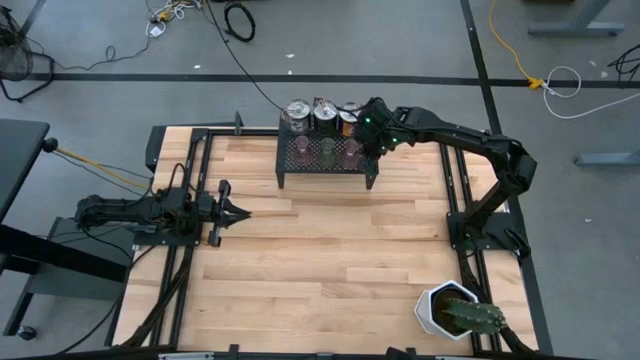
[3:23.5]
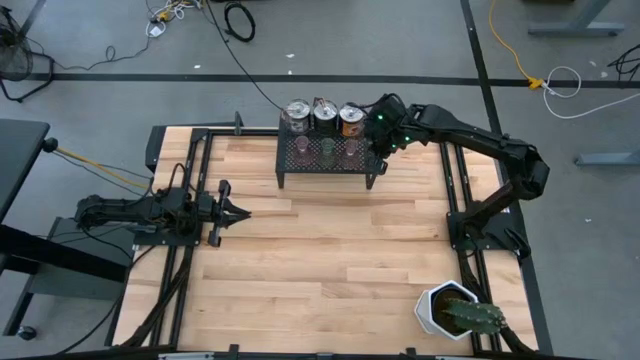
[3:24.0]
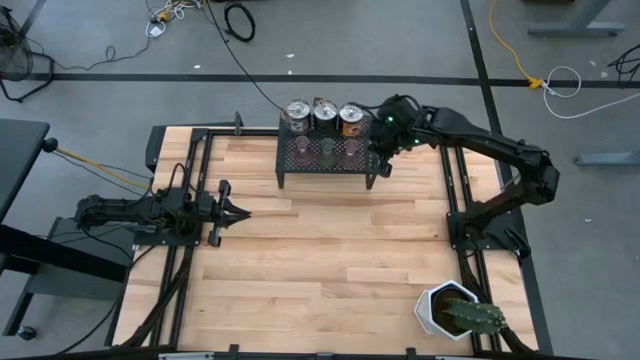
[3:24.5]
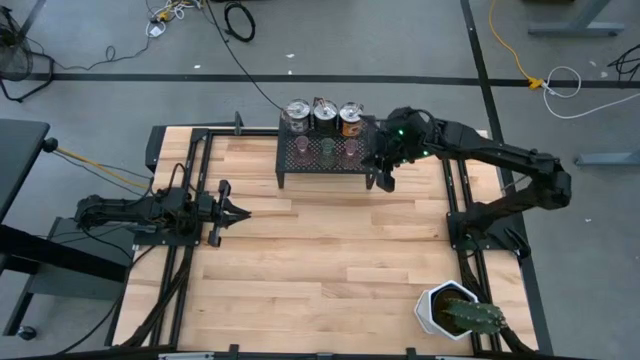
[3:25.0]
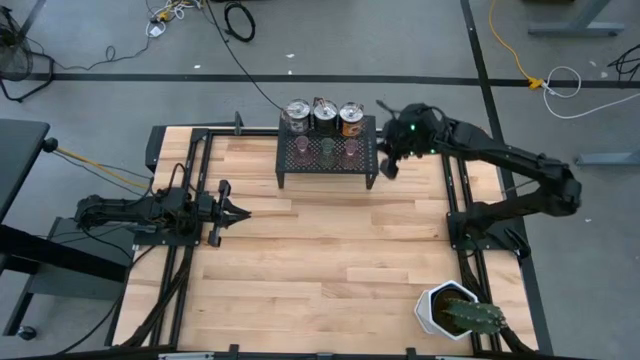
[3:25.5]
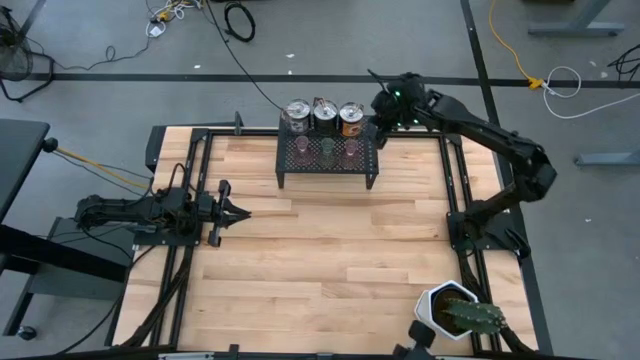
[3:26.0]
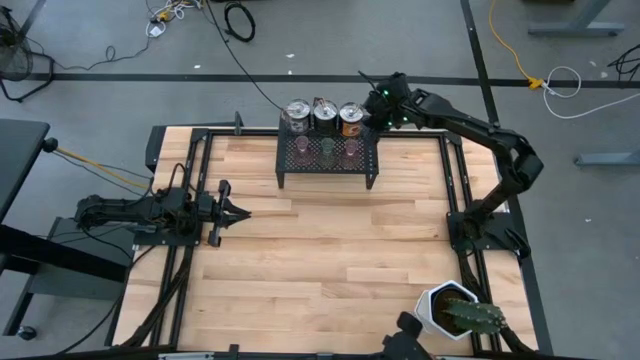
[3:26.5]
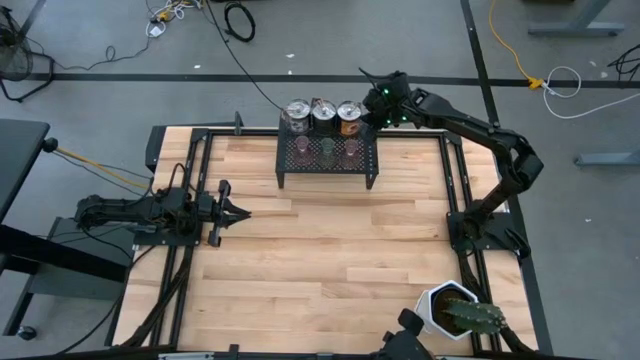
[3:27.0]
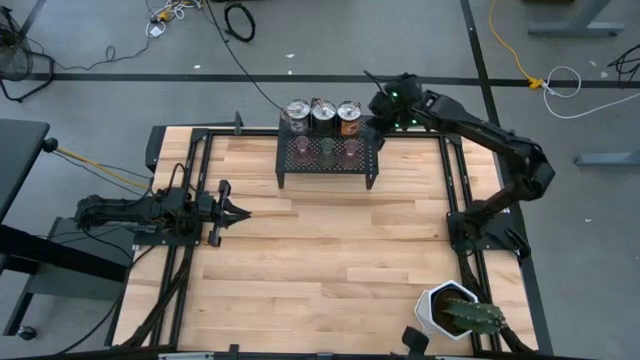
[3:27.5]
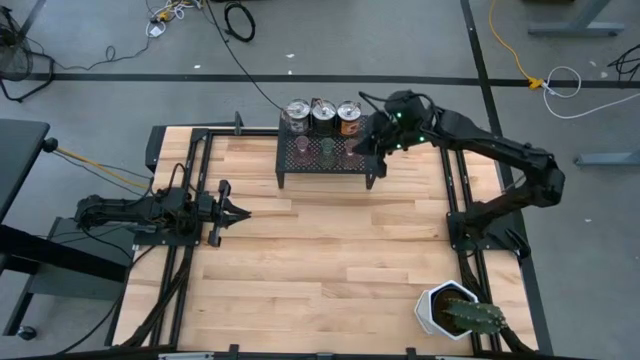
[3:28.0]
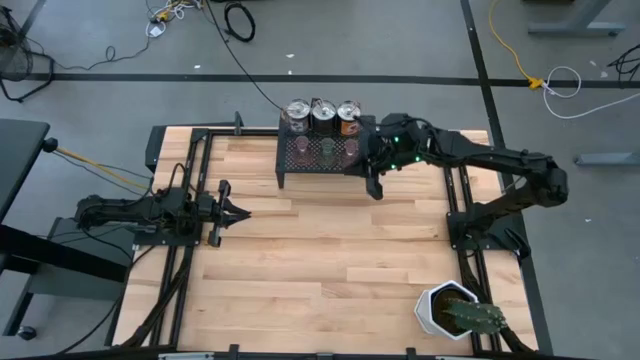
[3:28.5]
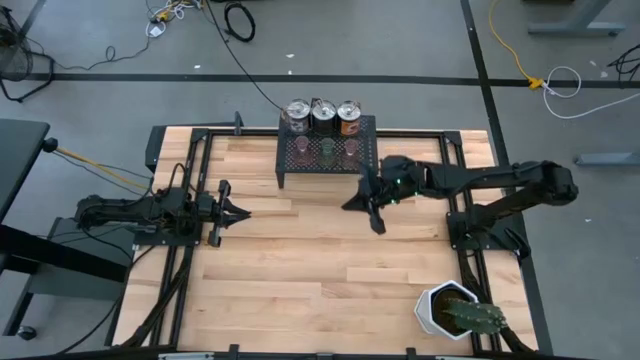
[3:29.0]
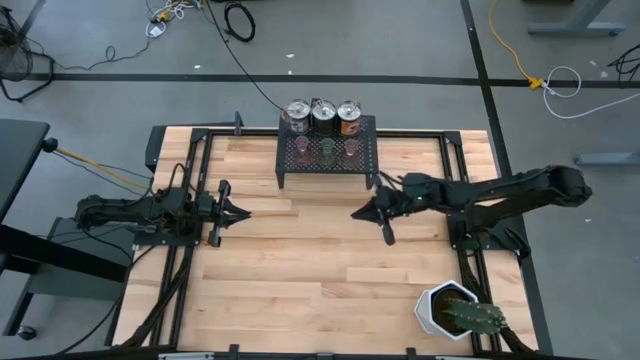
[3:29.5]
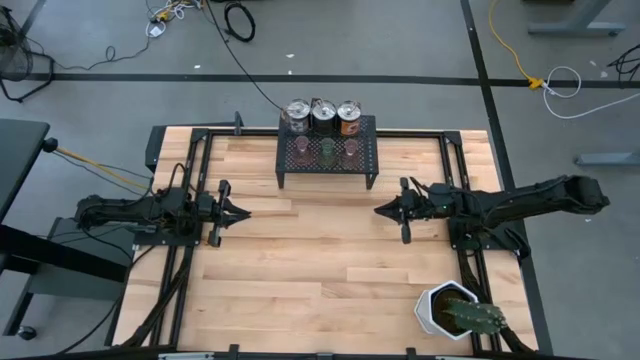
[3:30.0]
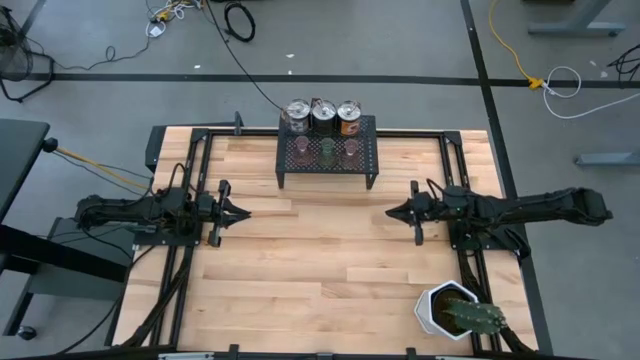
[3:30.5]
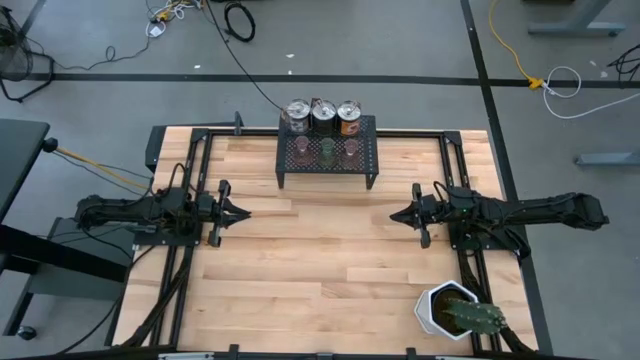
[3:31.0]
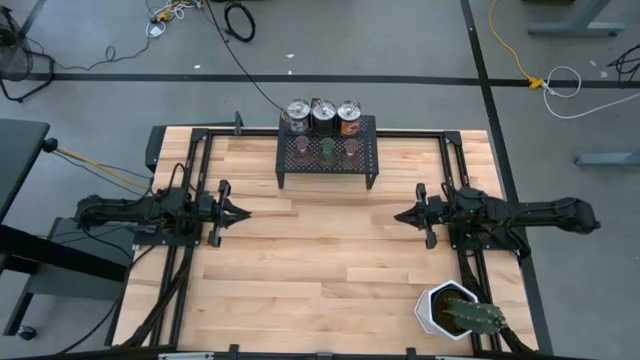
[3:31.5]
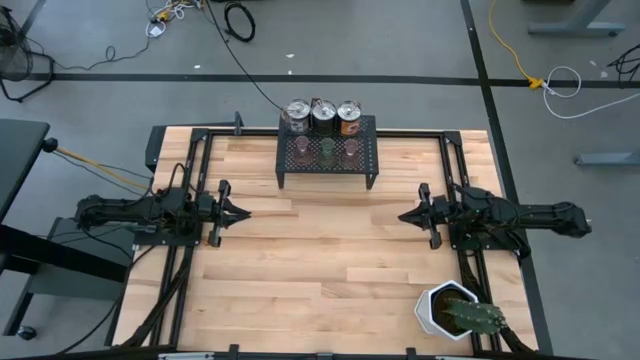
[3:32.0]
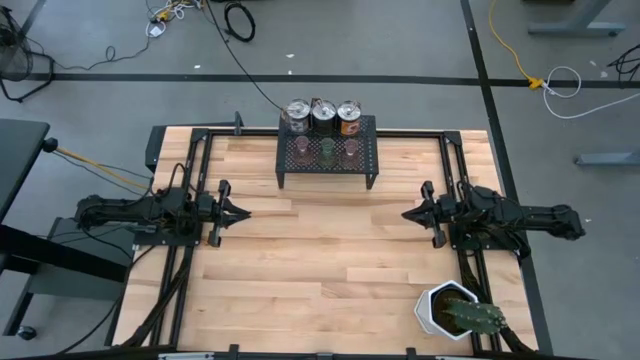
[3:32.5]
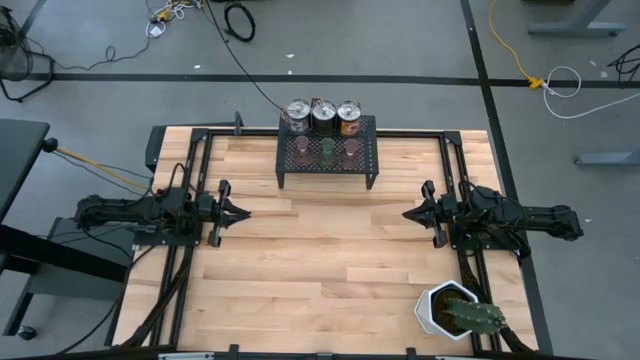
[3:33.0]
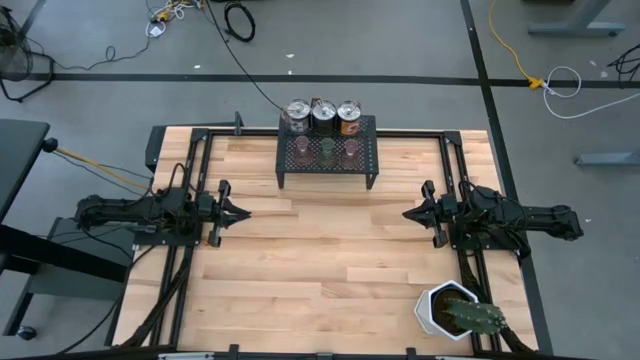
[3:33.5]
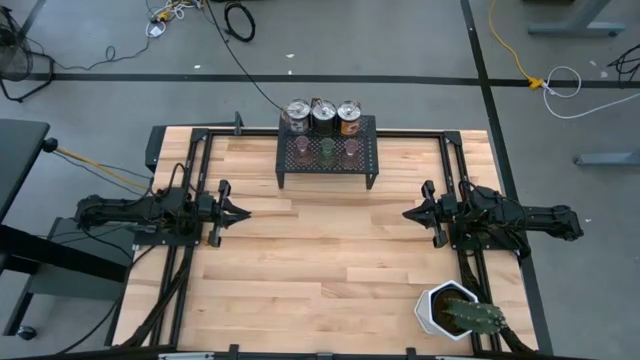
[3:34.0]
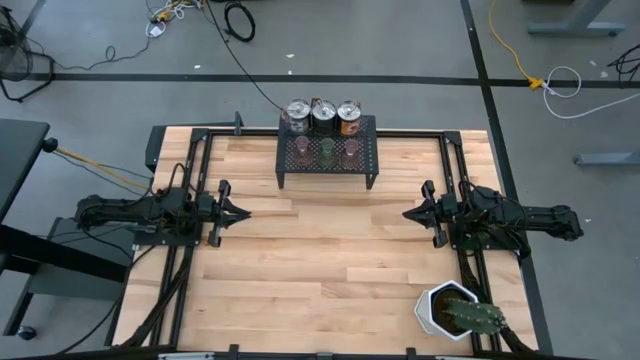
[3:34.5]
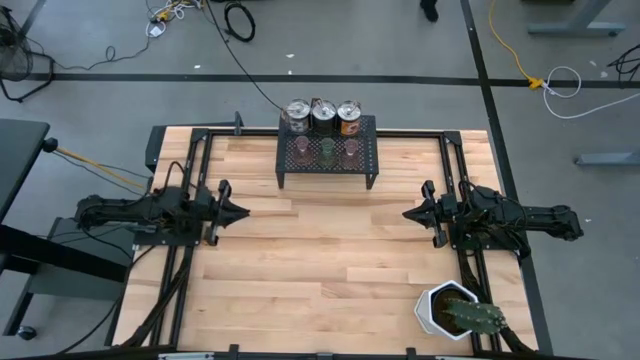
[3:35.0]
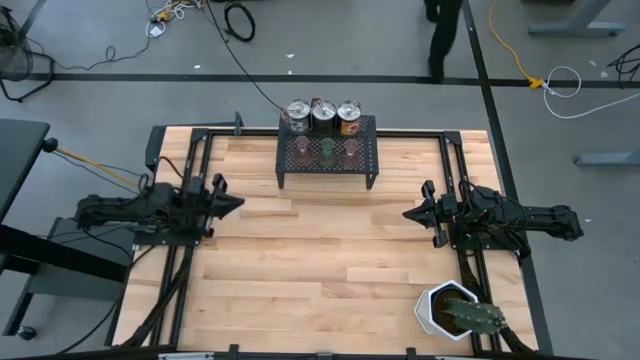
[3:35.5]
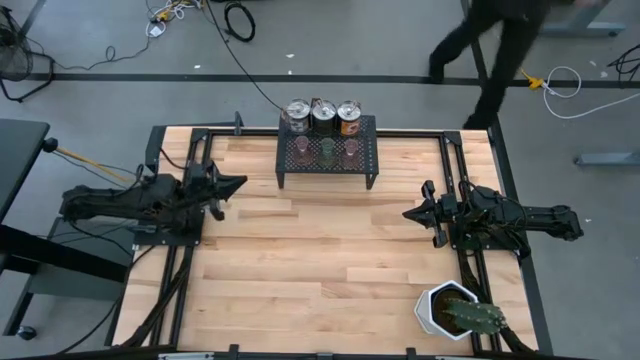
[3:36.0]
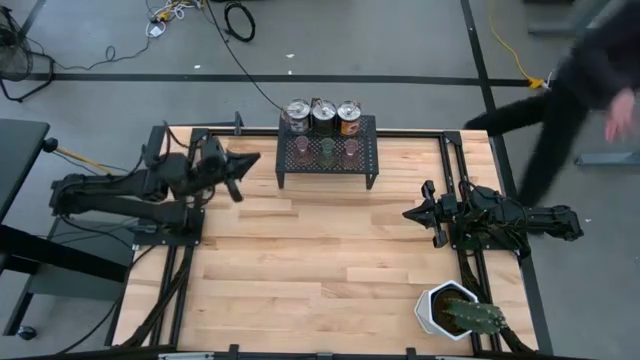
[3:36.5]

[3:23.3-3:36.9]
Task: Pick & Place candle stick holders
Adjust the silver scented candles

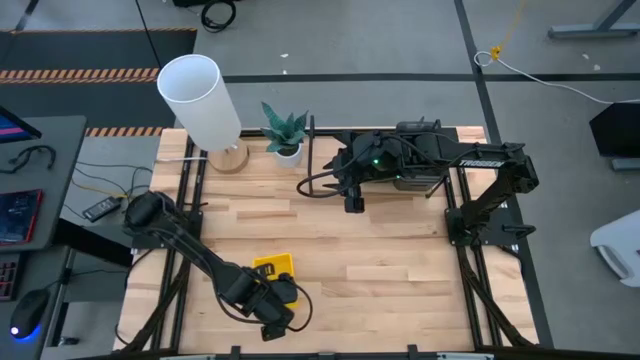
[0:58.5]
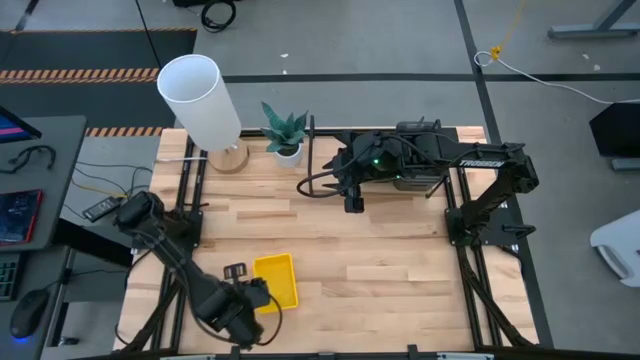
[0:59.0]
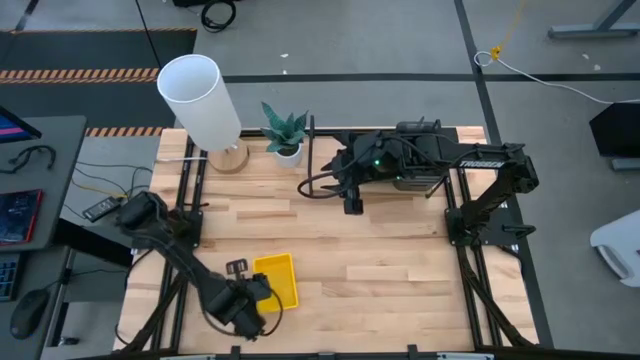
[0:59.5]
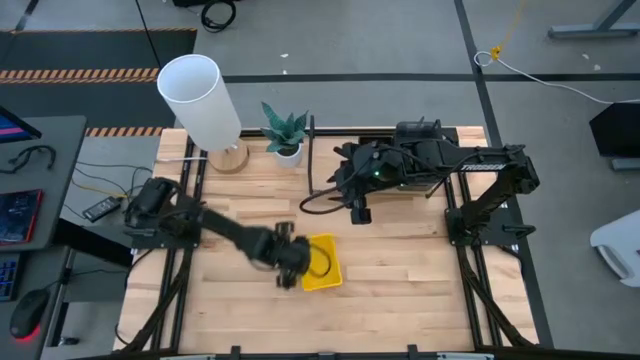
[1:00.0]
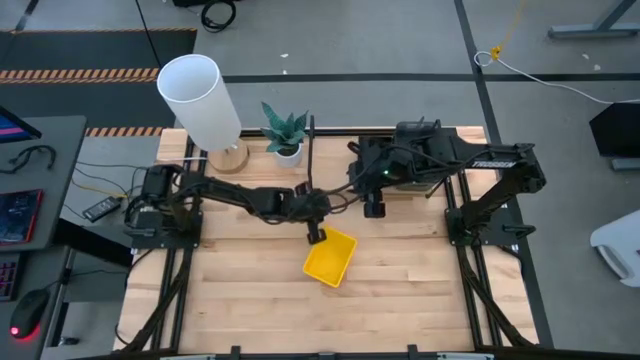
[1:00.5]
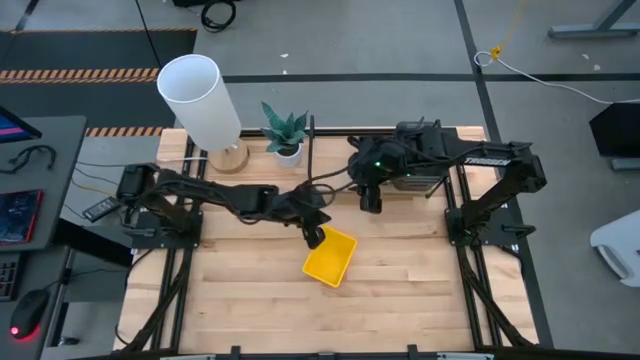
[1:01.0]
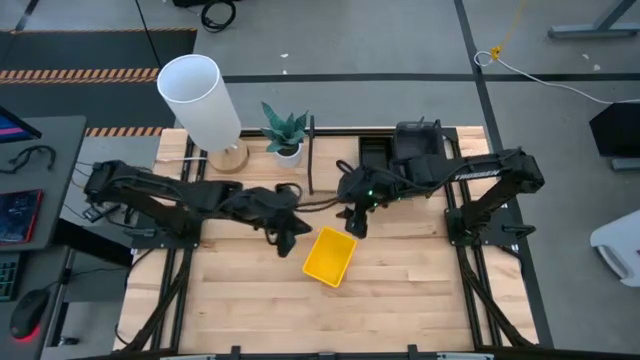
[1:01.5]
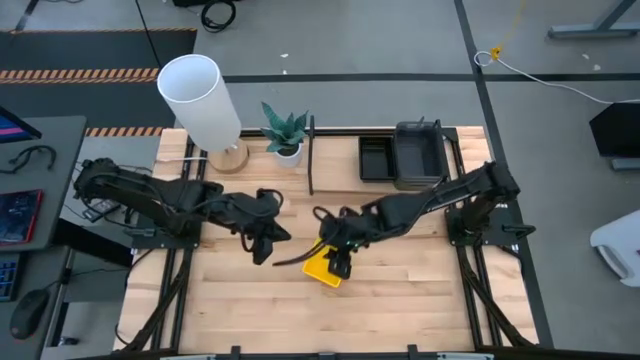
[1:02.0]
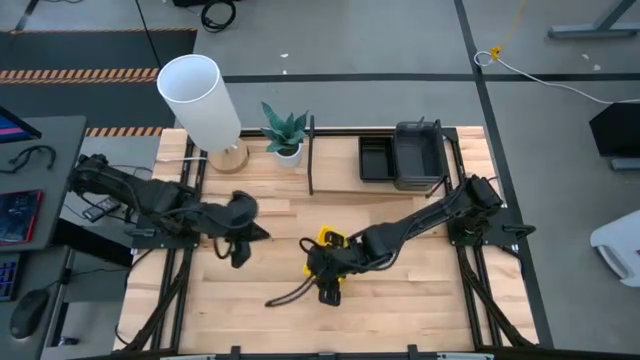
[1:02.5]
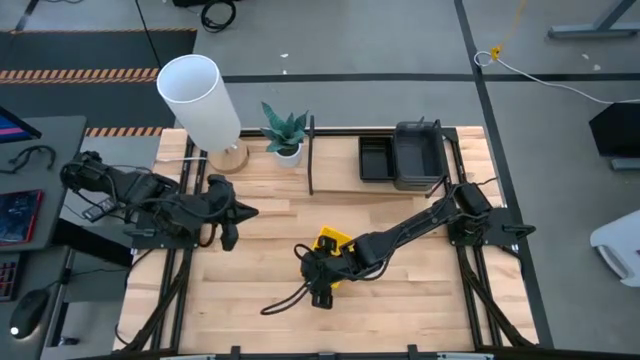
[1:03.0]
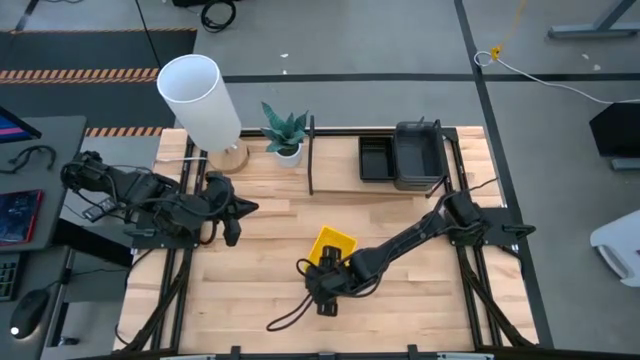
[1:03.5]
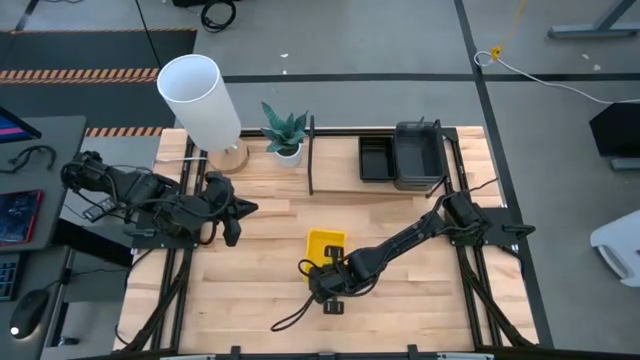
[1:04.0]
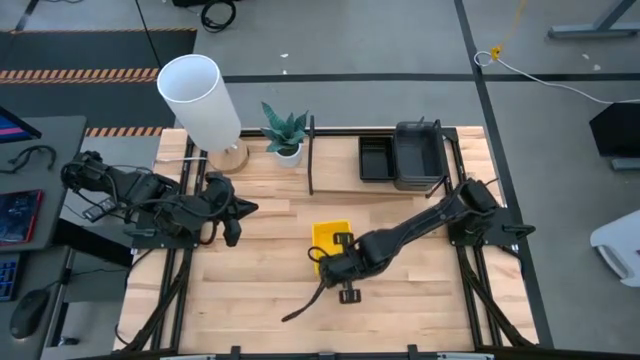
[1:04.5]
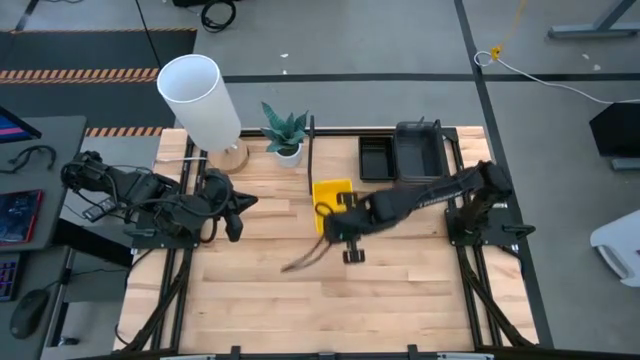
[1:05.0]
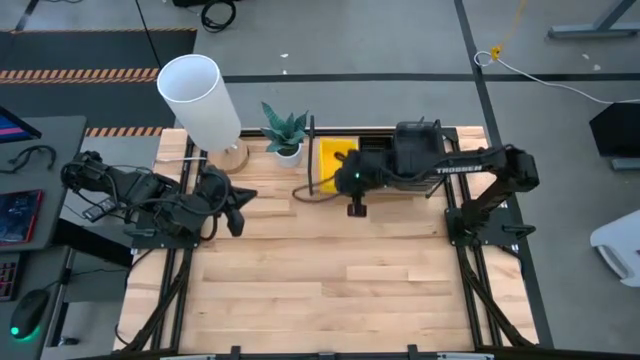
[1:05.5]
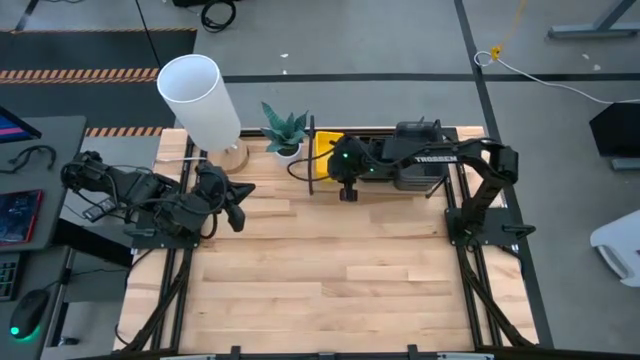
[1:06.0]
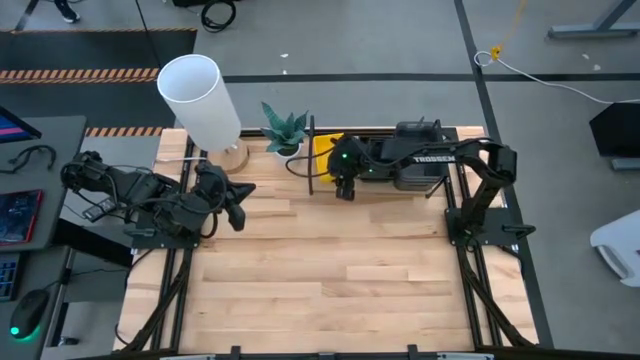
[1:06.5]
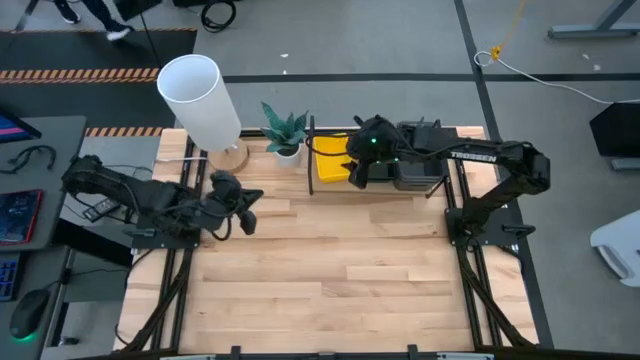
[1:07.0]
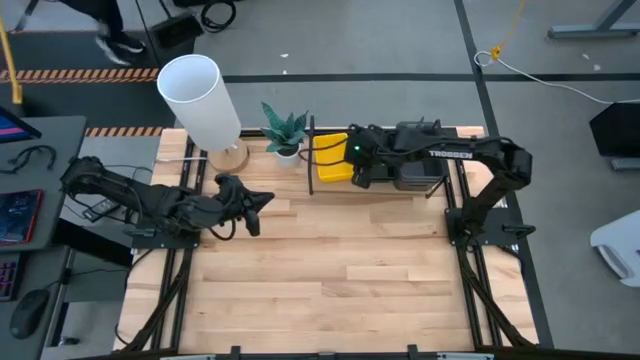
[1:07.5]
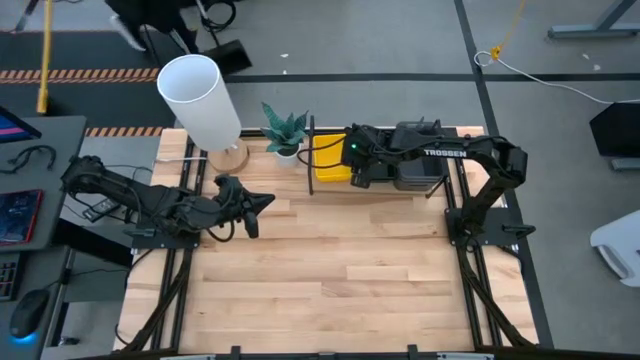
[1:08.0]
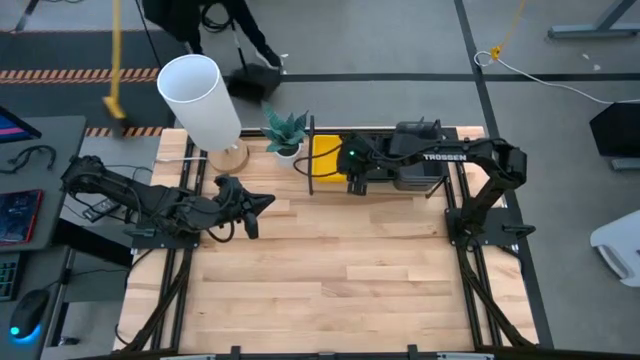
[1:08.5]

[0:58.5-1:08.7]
Task: Stack baskets on shelf by color
Put the stacked yellow bins on the shelf
